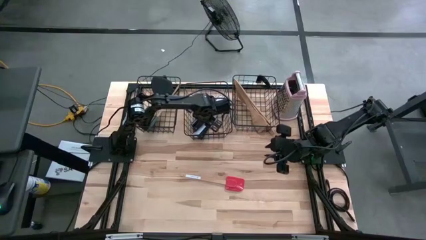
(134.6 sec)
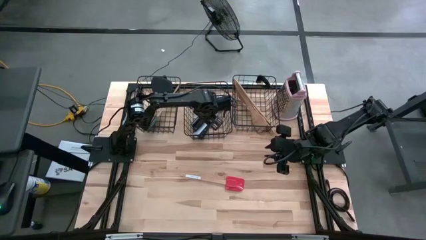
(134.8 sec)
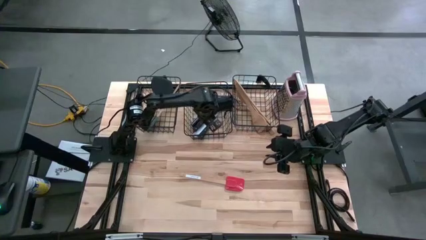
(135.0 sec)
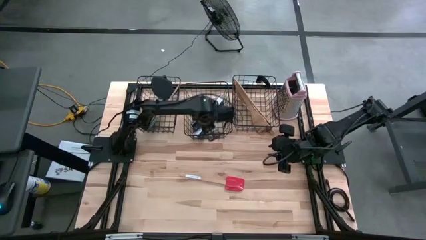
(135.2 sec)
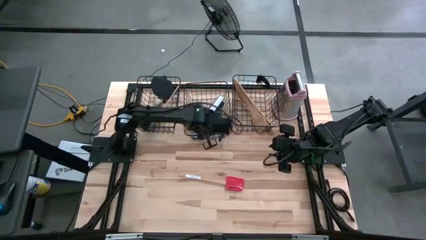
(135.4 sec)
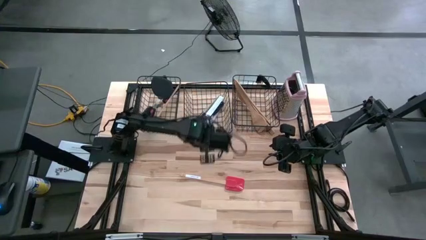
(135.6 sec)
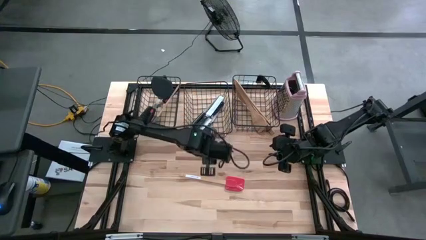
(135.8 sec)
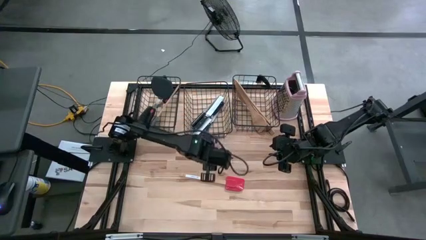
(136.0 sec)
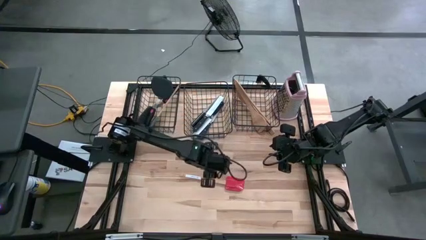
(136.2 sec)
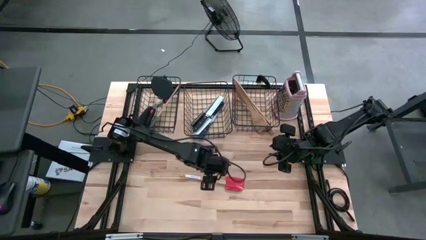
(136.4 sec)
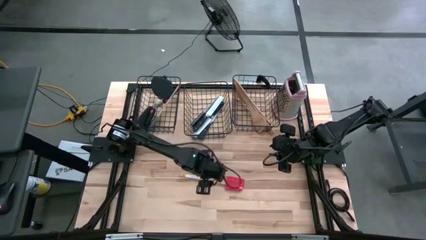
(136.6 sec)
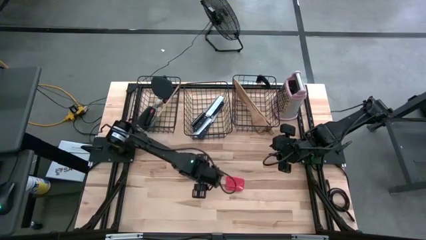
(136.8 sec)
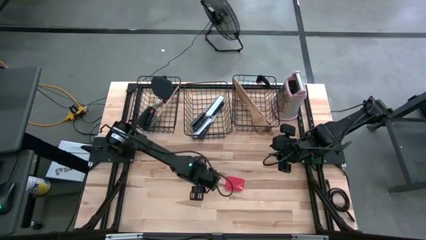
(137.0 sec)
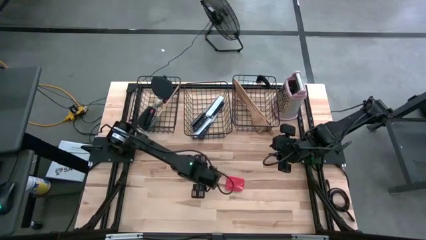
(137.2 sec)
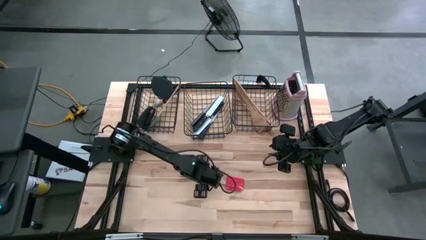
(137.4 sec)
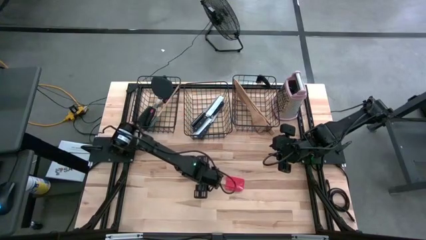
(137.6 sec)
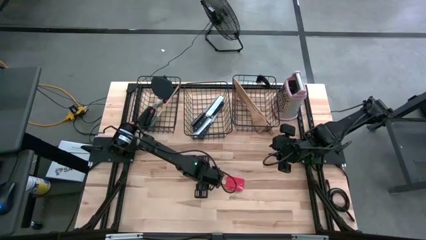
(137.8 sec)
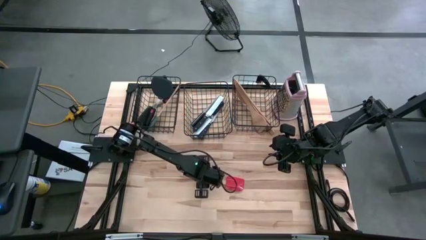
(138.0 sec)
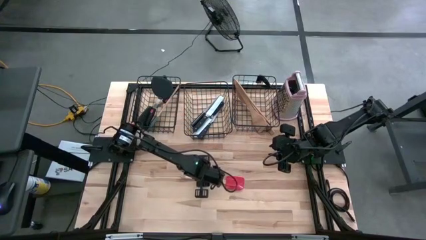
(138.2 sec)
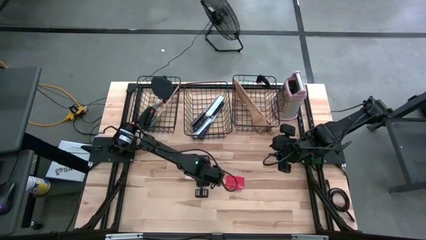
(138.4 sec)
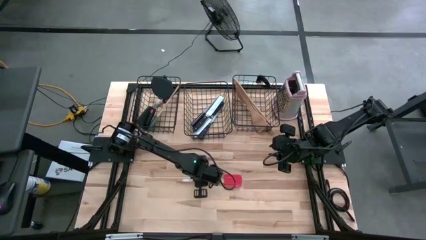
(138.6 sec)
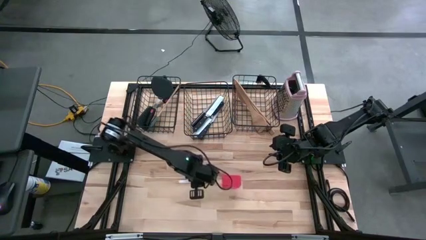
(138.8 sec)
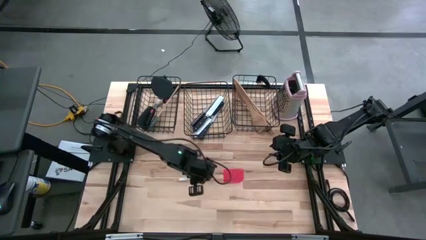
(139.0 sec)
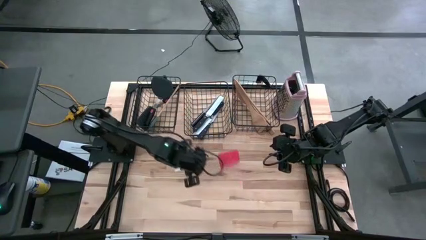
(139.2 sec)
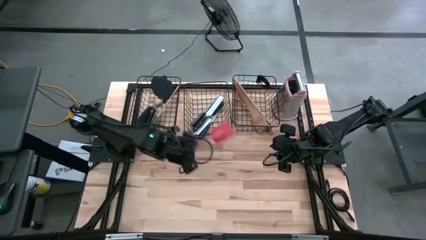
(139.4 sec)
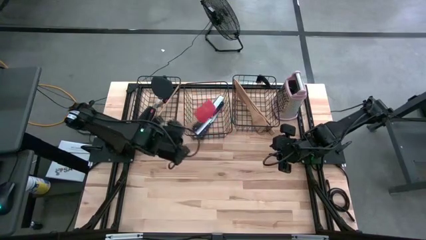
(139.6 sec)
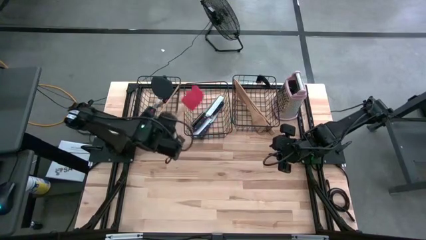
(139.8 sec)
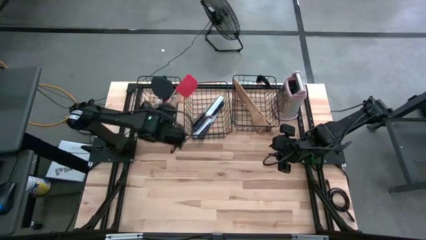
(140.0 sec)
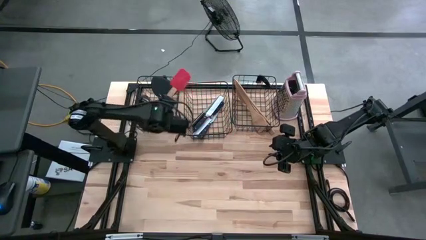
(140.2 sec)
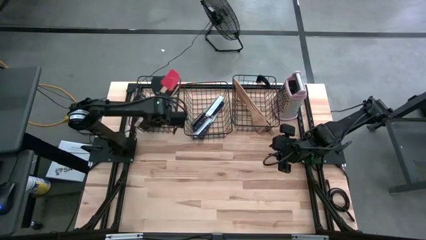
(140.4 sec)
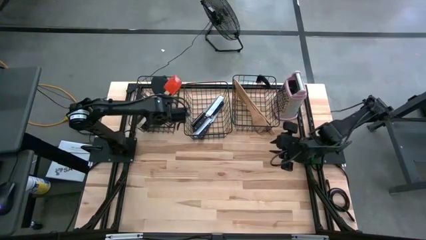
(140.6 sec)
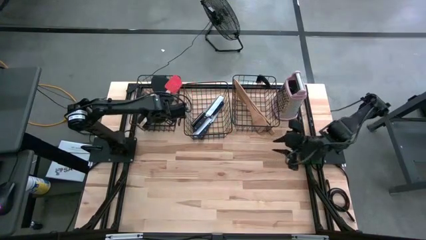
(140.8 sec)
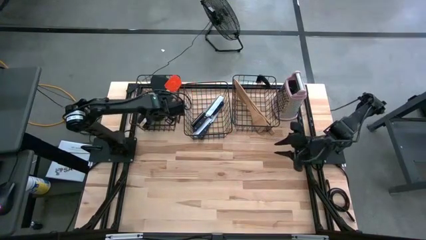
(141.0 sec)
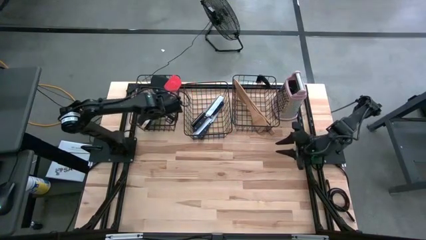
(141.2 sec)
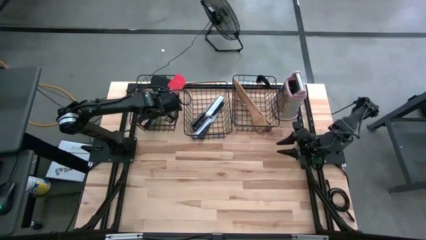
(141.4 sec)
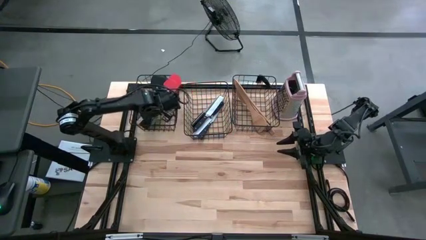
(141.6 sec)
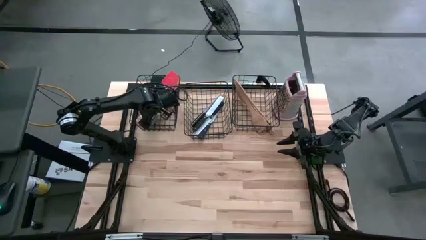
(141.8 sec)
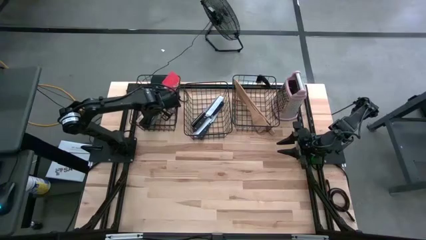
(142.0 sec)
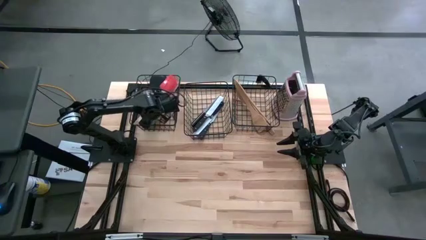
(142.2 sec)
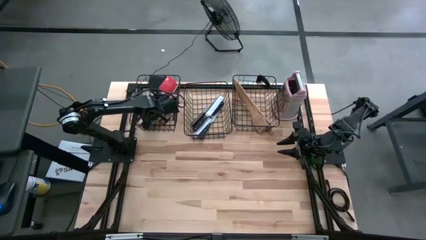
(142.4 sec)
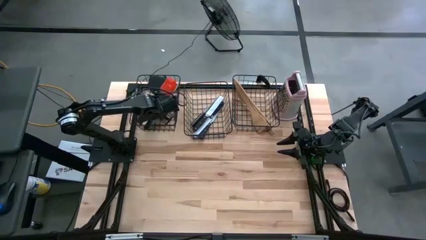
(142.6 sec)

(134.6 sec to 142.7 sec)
Task: Pick & Place Kitchen Items
Put the red spatula into the left black wire basket

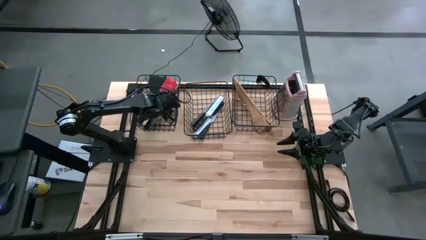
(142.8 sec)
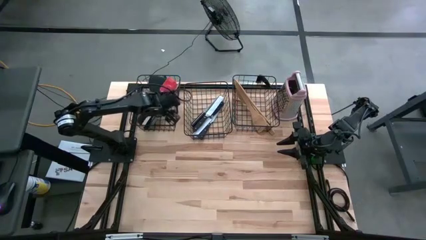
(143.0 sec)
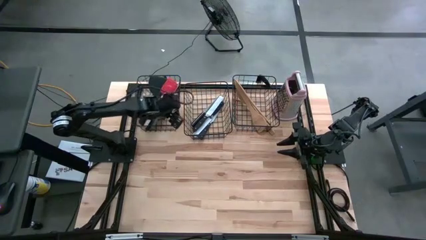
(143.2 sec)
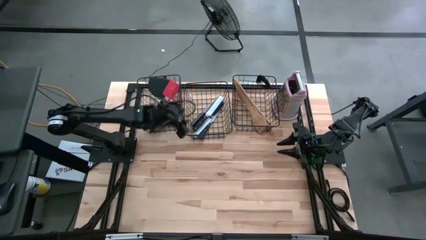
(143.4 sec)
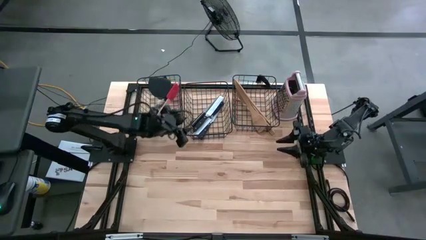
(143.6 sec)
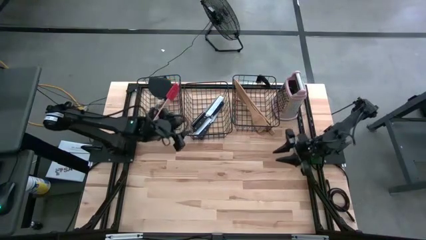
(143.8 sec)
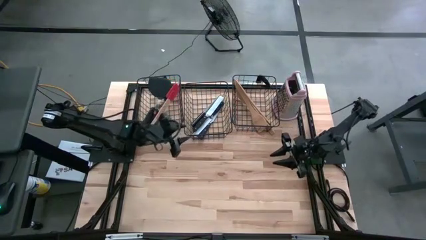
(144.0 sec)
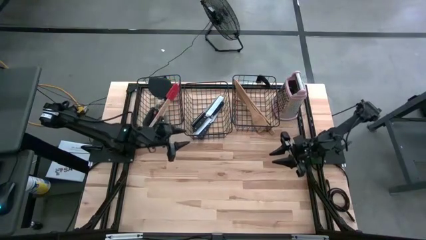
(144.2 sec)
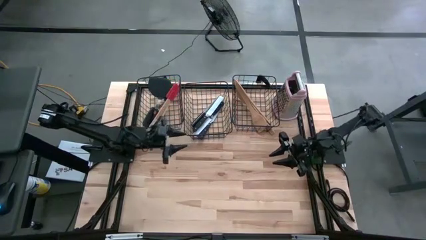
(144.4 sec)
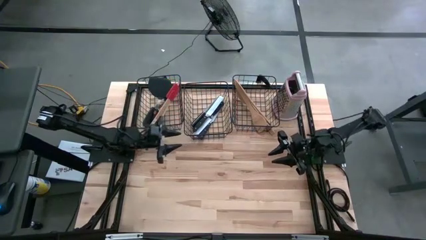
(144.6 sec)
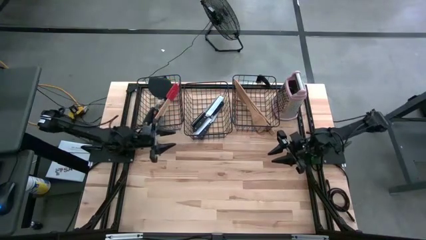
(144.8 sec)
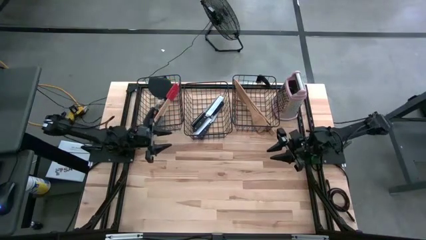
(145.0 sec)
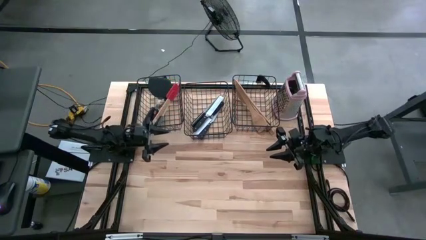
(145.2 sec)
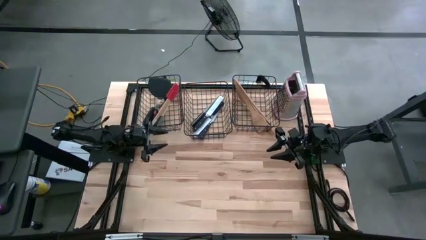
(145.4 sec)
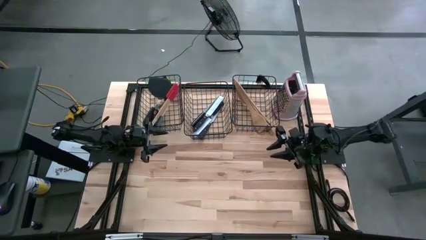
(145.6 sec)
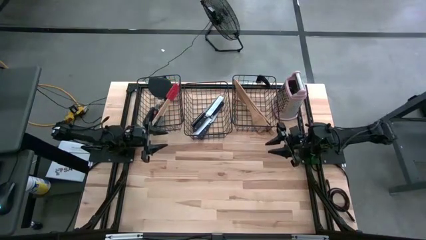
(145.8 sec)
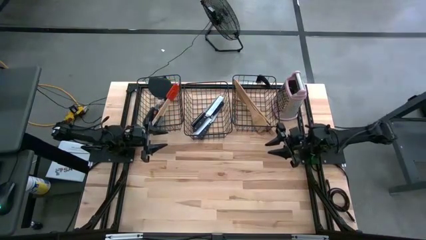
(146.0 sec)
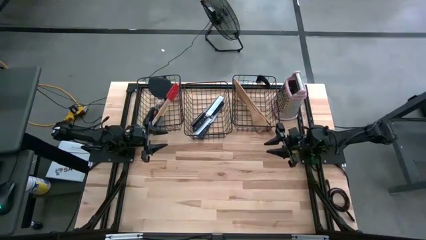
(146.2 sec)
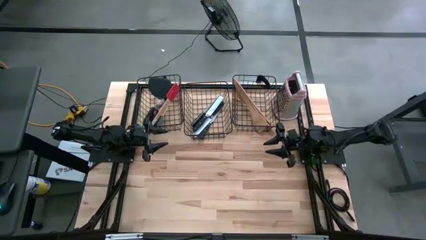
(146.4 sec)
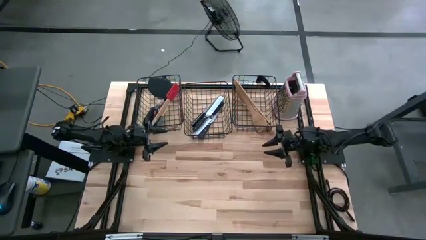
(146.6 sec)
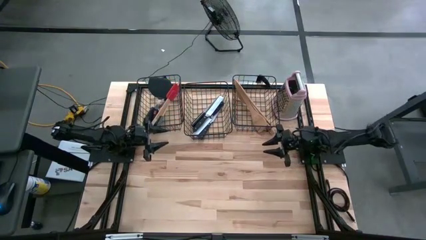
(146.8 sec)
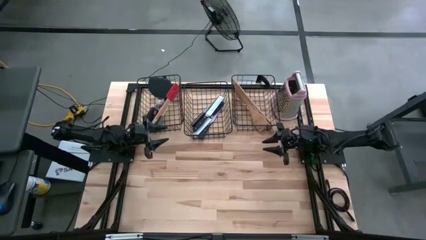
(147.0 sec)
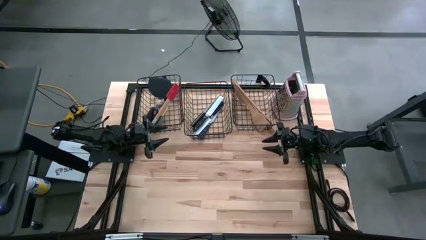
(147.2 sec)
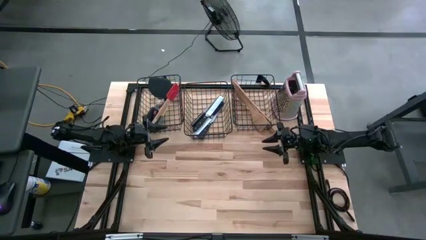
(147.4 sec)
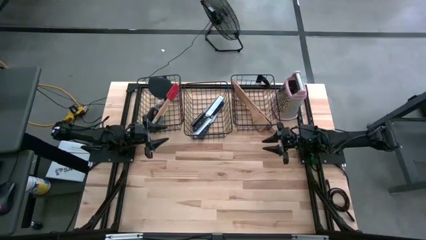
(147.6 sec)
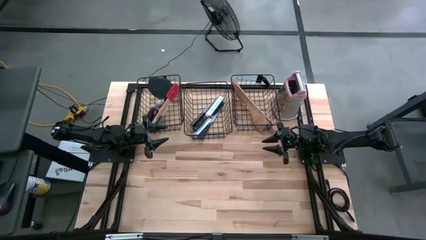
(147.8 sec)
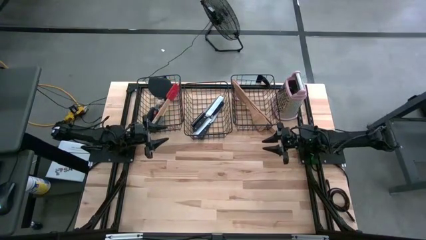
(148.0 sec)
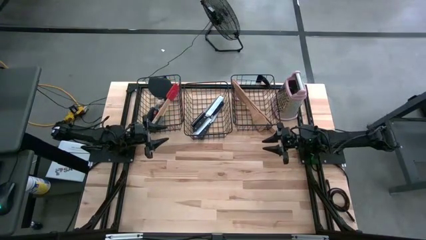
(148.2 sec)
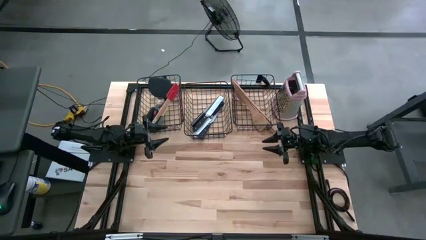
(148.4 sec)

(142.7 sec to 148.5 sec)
Return to Home Position
